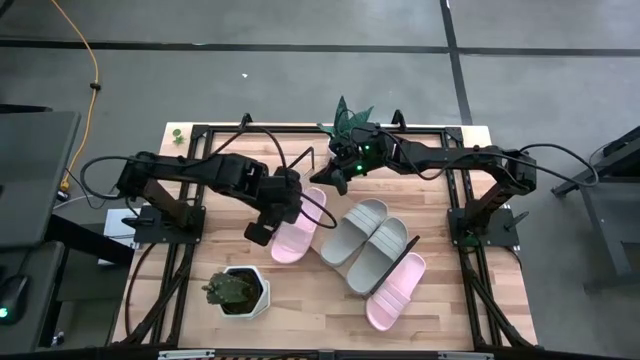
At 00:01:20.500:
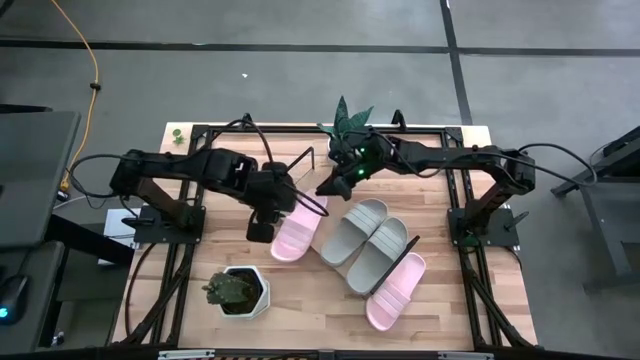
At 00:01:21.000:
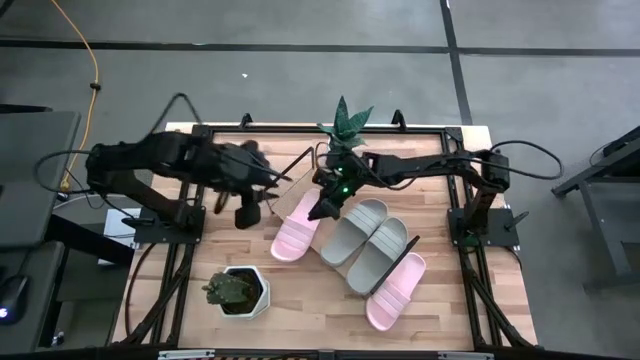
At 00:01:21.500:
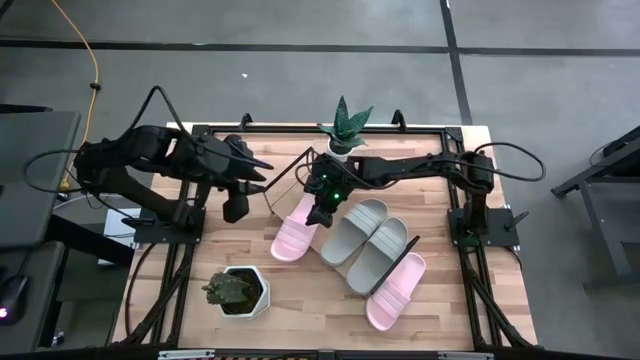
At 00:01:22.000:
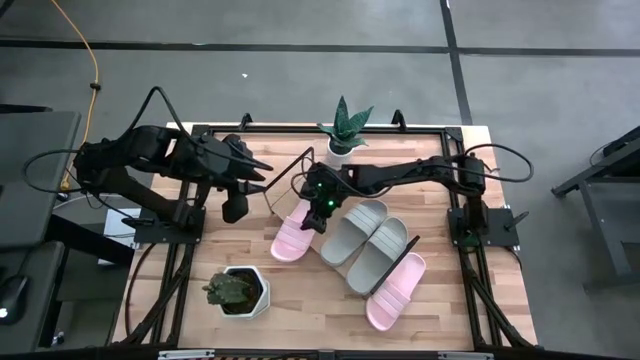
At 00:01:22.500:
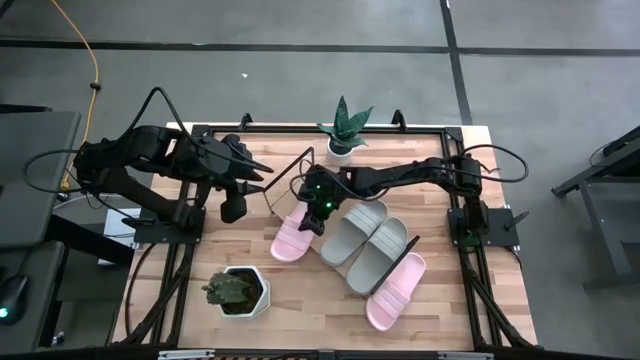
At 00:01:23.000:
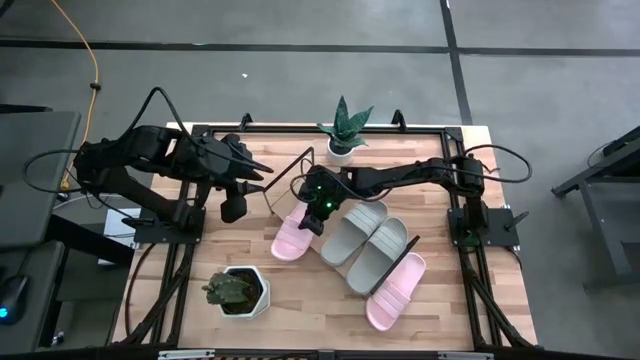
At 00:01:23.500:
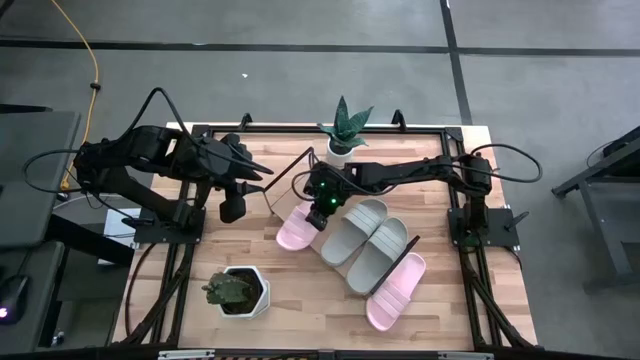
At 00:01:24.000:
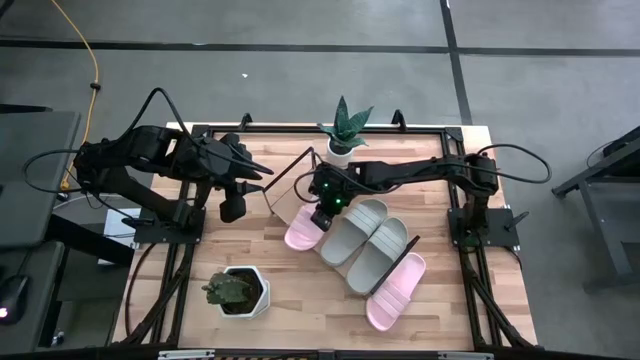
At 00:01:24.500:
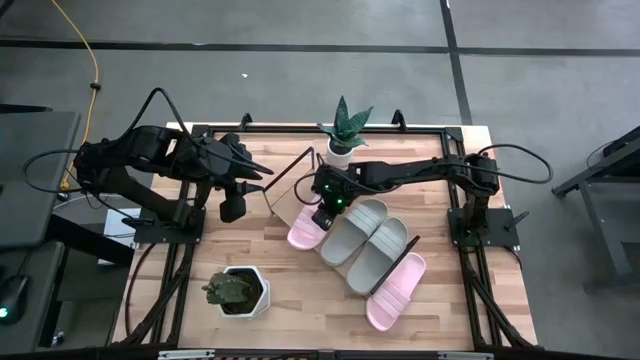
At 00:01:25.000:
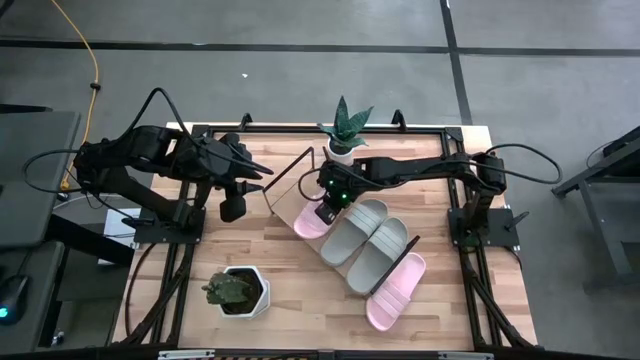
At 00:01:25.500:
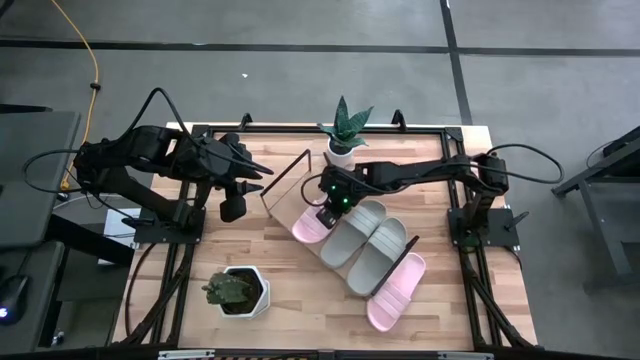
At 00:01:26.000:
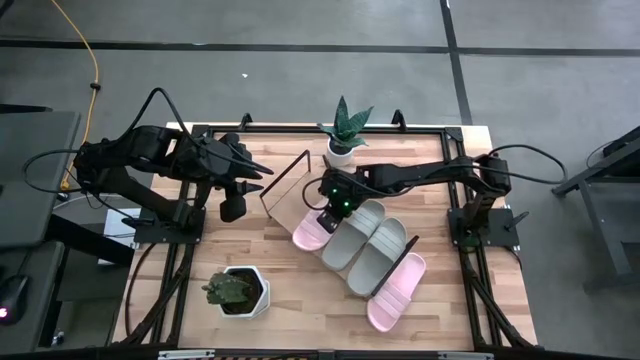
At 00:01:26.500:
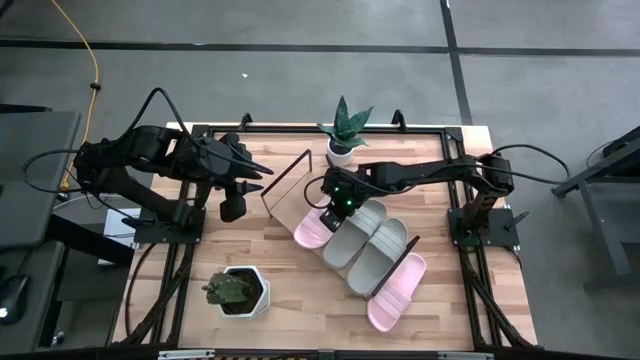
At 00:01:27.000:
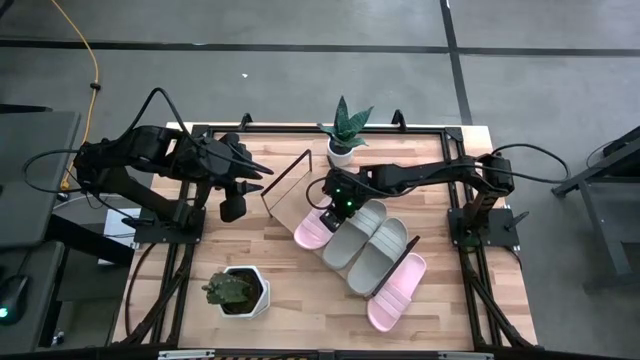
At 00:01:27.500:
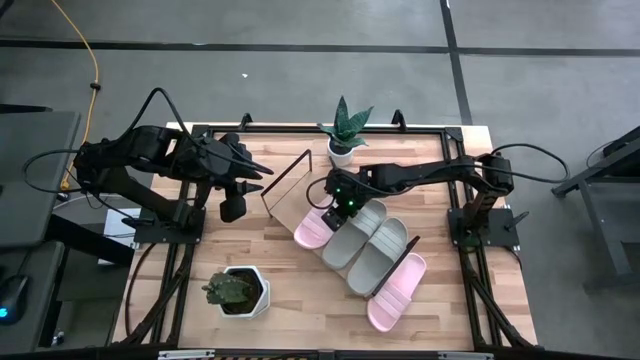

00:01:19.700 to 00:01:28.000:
Task: Pick and place slides into the shelf
Put the left pink slide on the shelf

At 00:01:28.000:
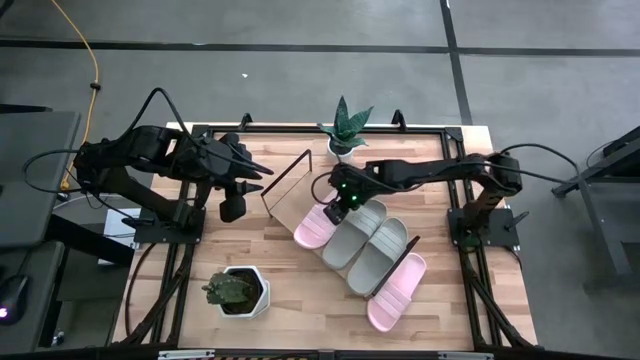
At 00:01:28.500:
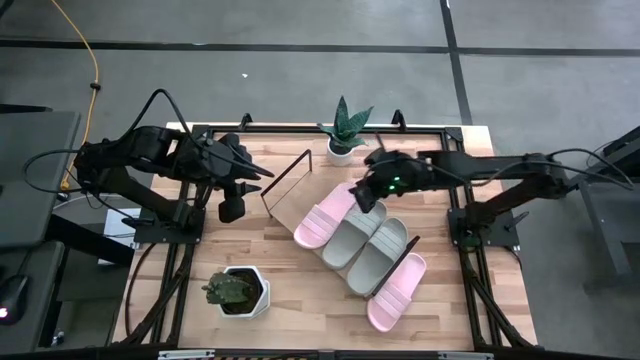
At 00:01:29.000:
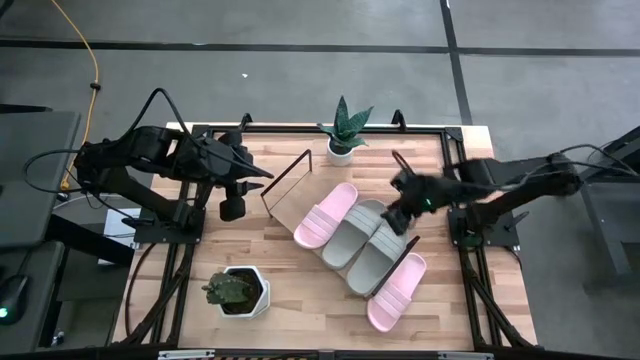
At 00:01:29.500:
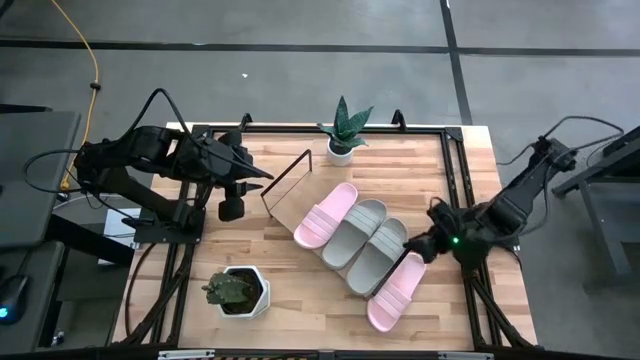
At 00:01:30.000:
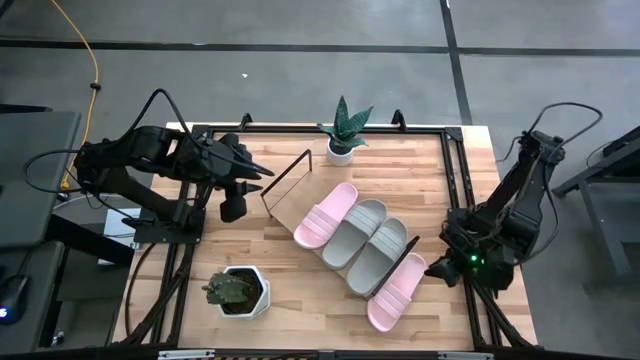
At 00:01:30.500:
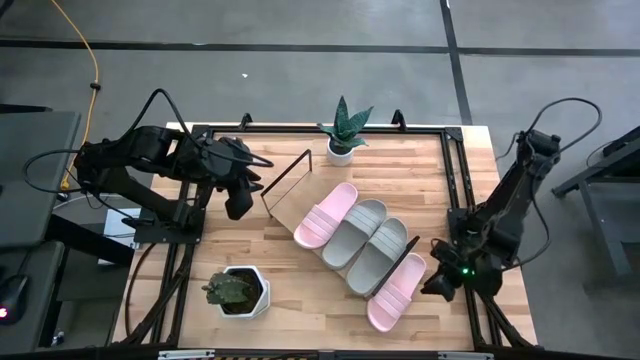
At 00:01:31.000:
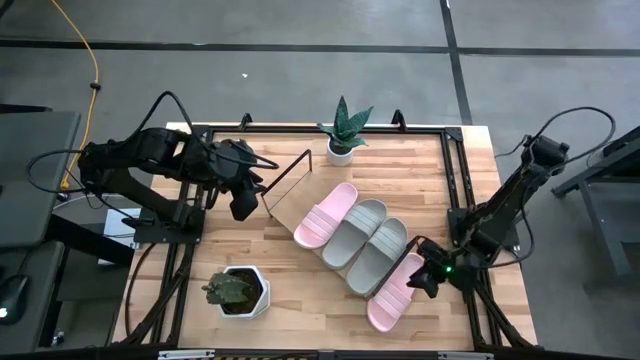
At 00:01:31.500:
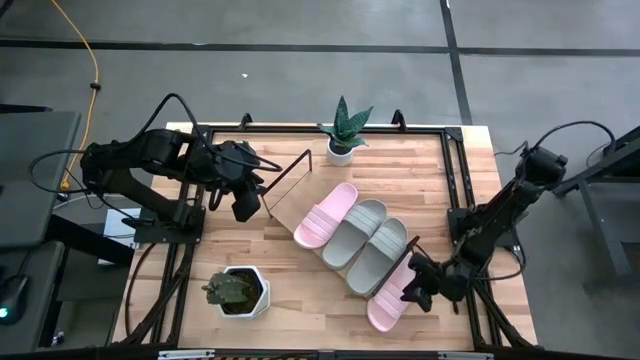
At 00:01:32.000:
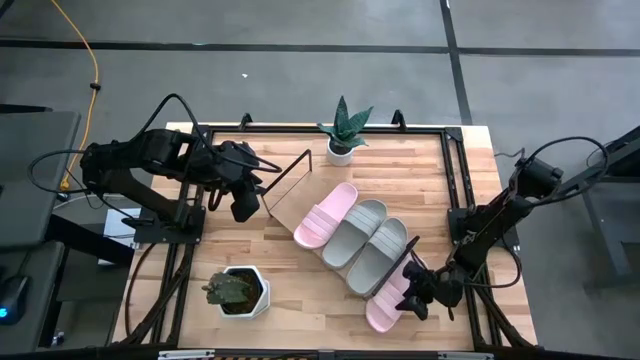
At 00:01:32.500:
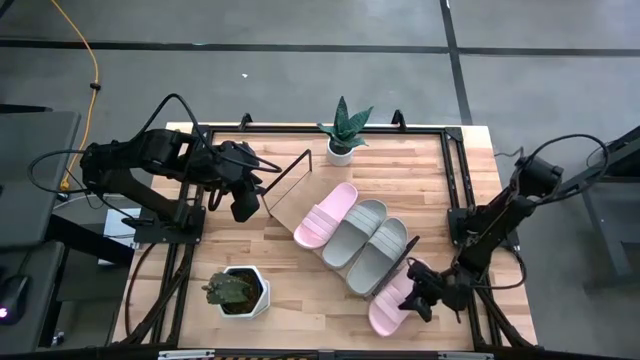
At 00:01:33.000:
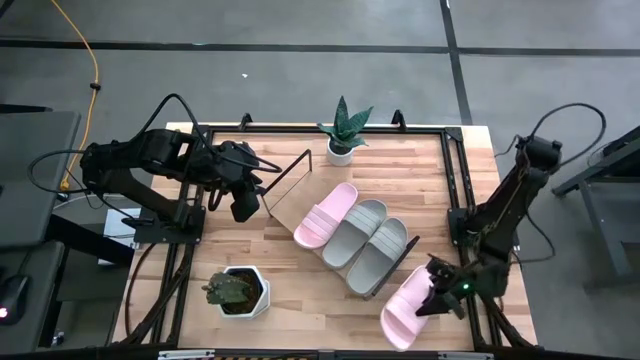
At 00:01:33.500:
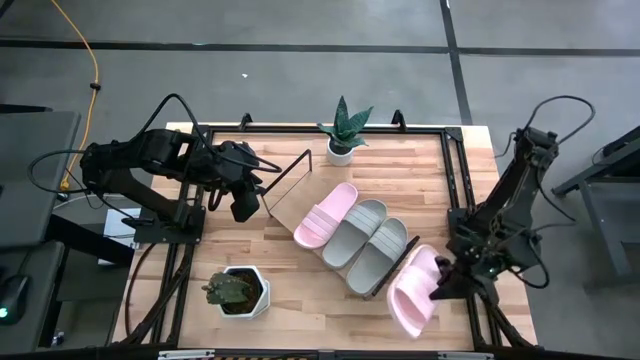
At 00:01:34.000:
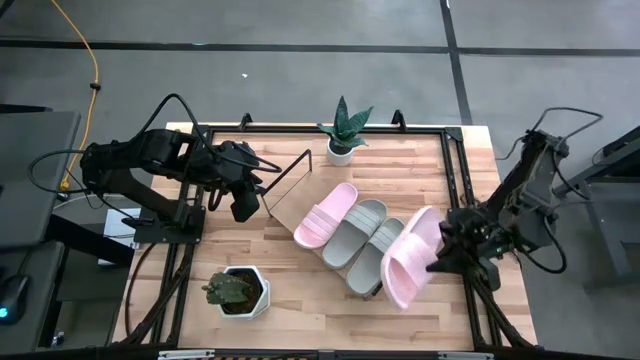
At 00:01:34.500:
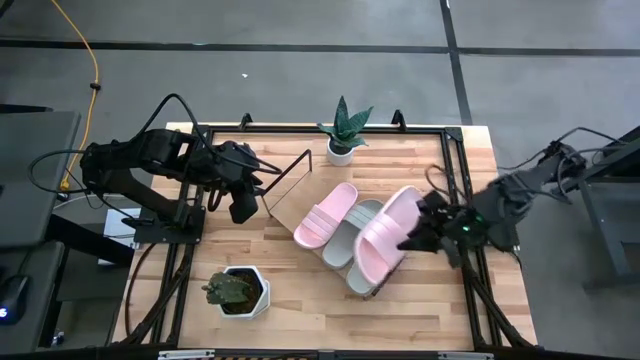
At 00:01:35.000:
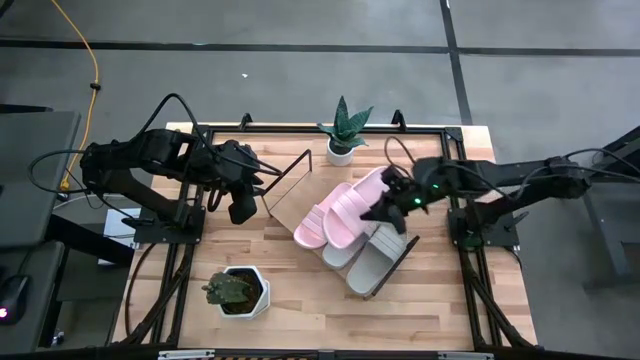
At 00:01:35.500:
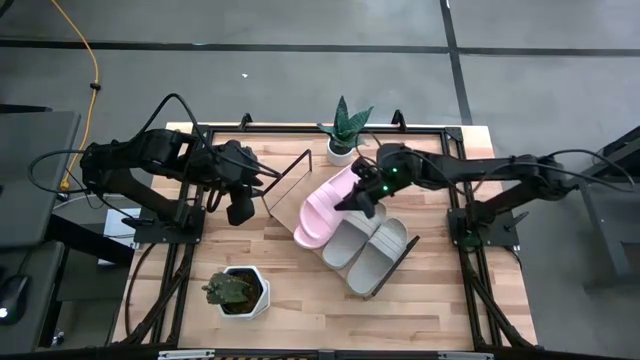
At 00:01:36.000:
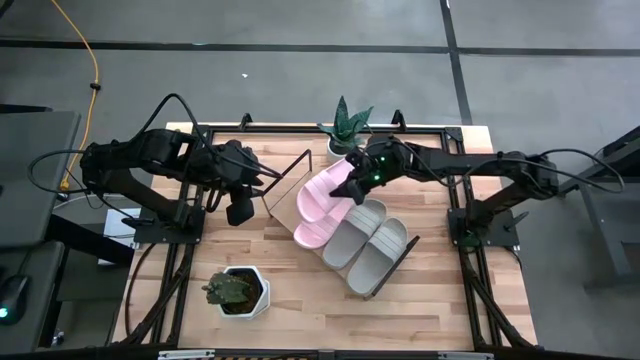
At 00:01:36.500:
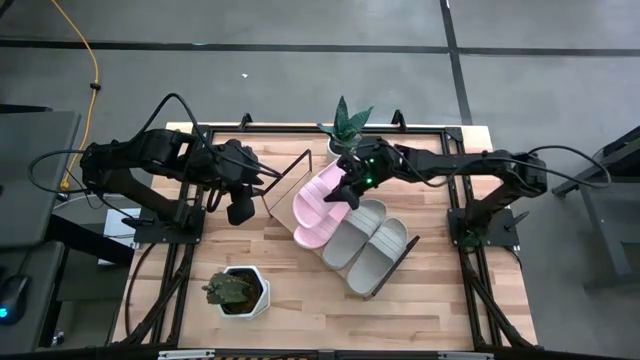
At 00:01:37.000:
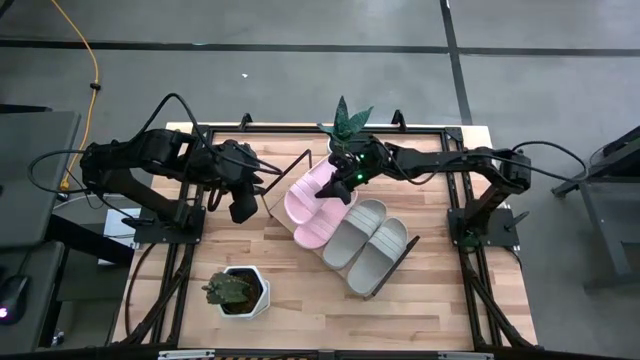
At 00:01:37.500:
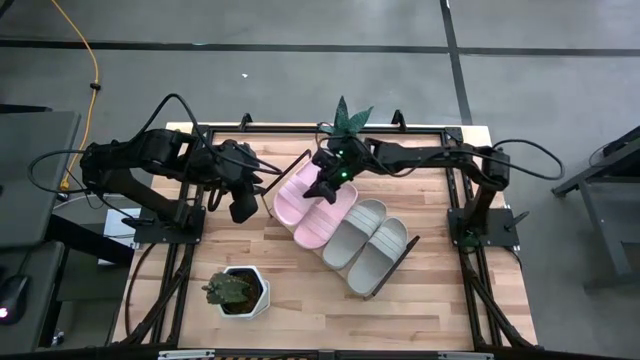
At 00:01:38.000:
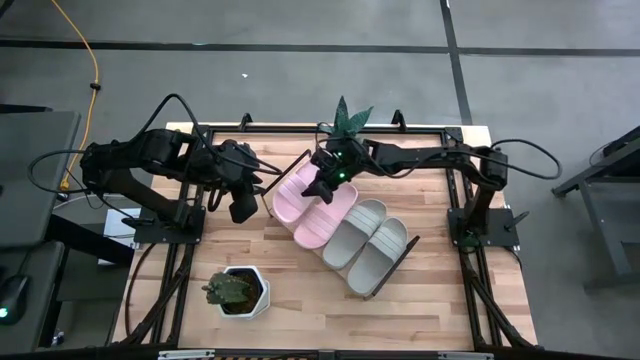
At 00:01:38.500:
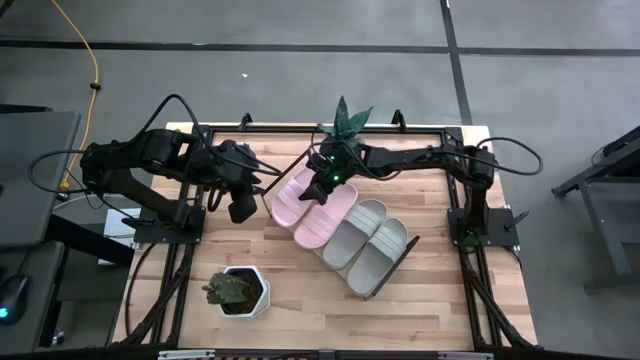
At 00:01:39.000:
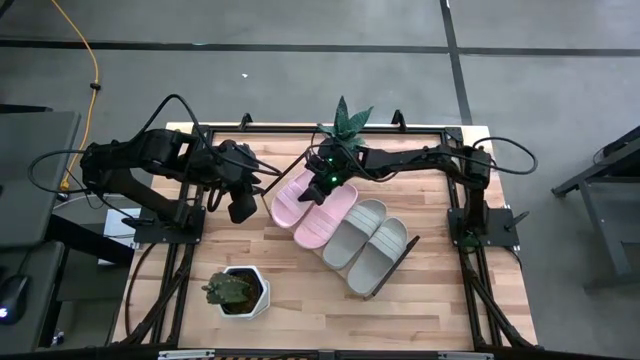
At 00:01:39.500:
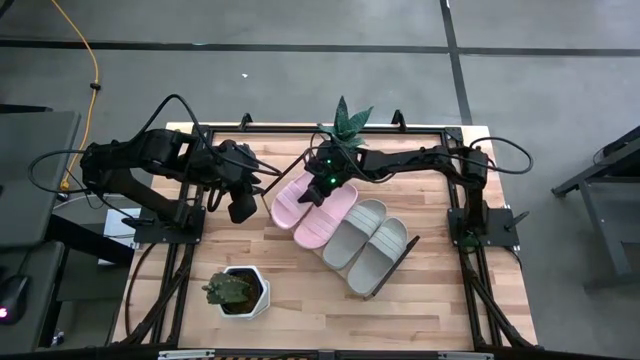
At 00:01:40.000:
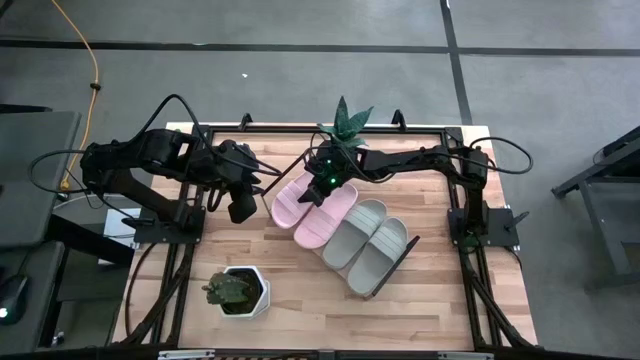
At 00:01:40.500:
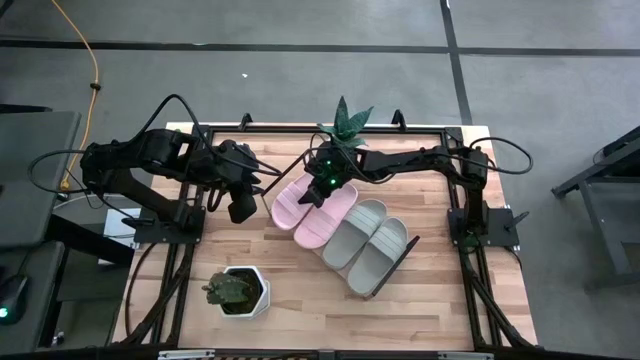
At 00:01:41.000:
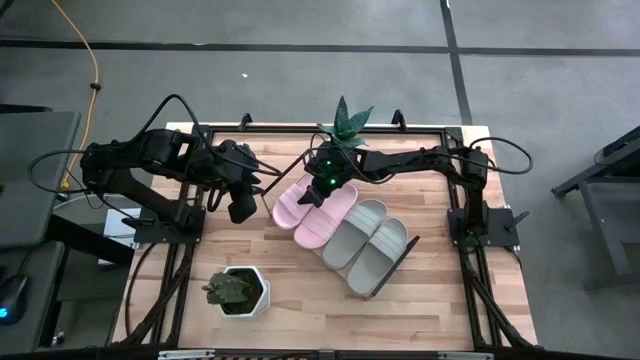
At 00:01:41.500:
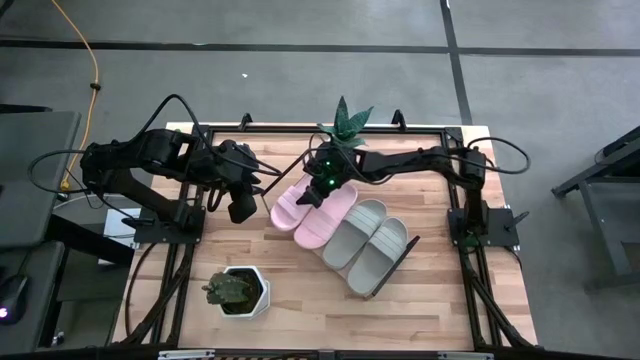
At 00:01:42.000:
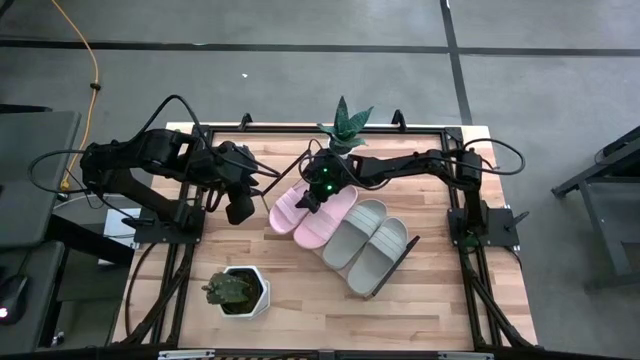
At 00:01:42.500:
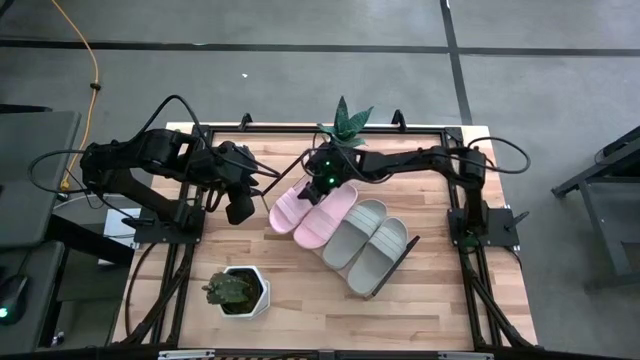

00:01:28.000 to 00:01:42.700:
Put the pink slide on the shelf
